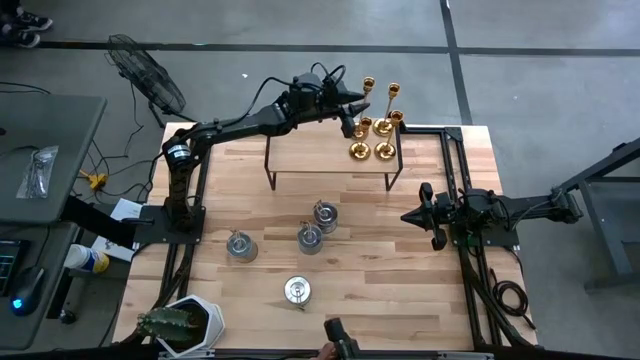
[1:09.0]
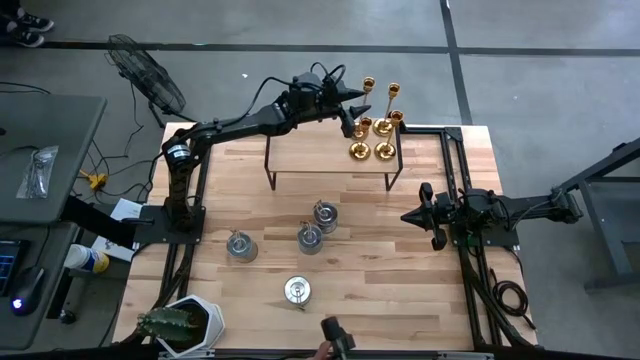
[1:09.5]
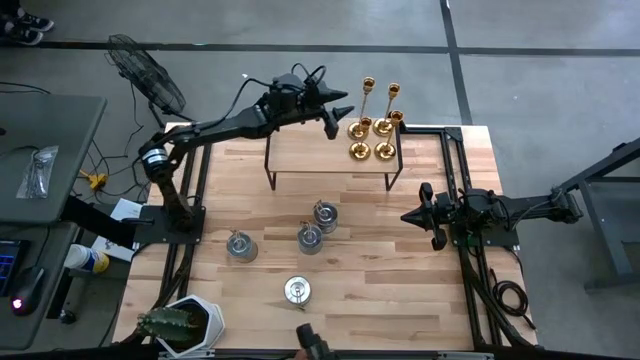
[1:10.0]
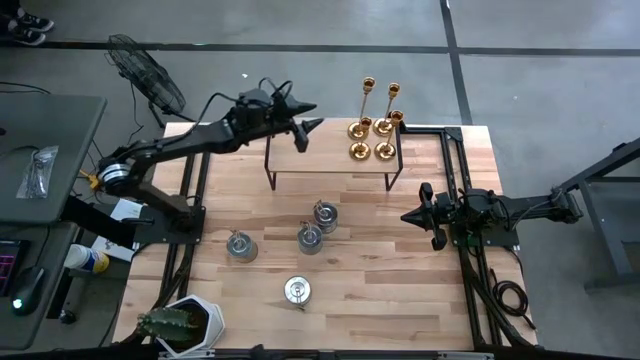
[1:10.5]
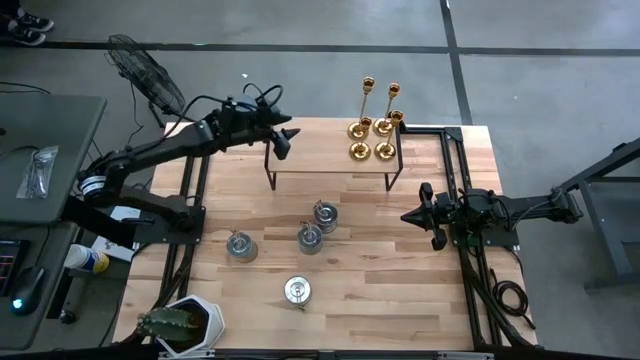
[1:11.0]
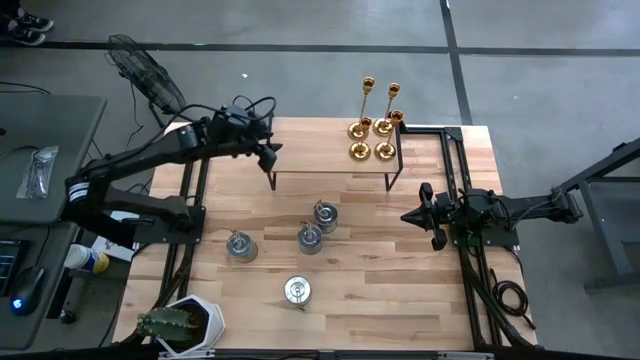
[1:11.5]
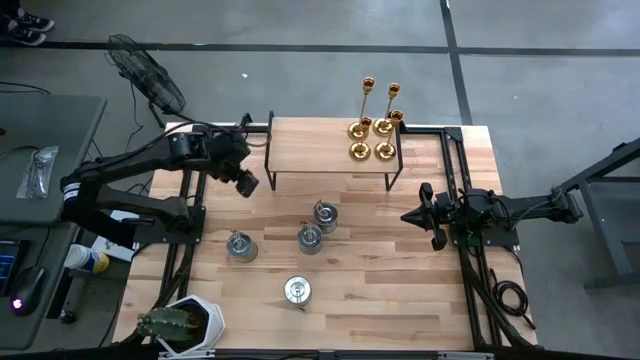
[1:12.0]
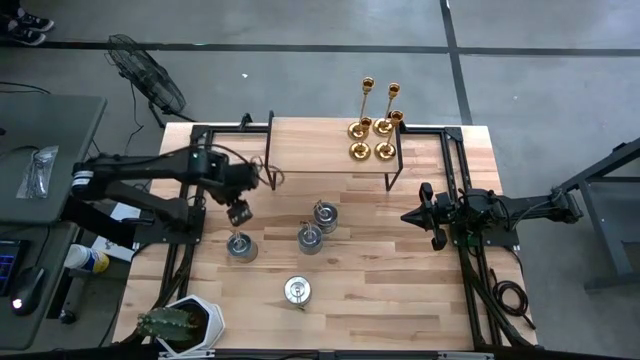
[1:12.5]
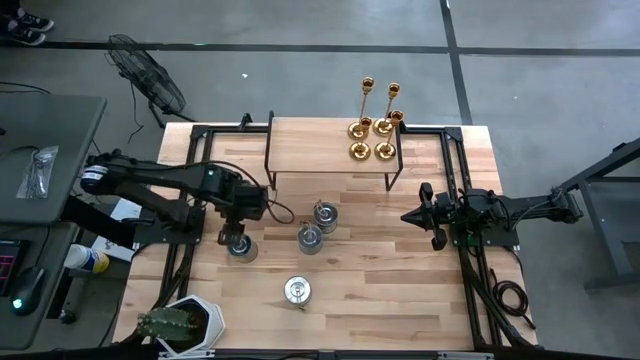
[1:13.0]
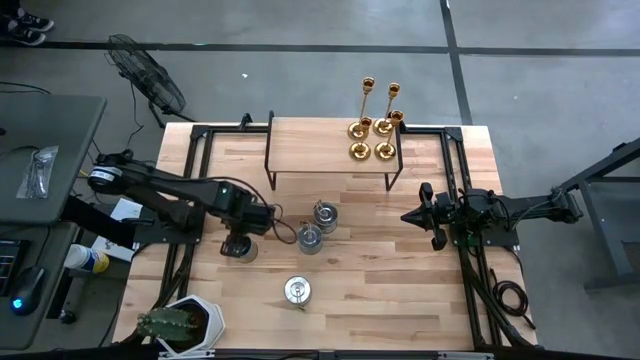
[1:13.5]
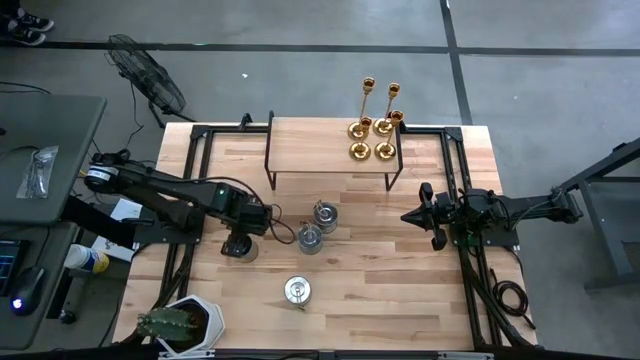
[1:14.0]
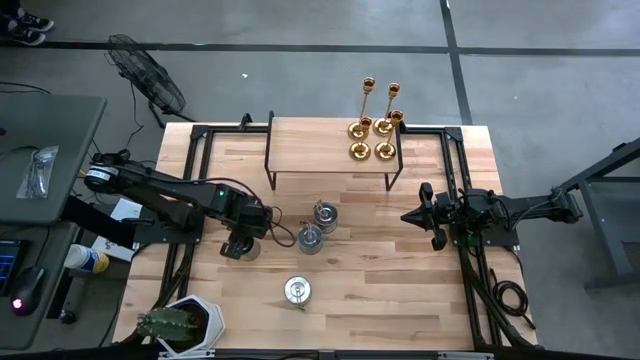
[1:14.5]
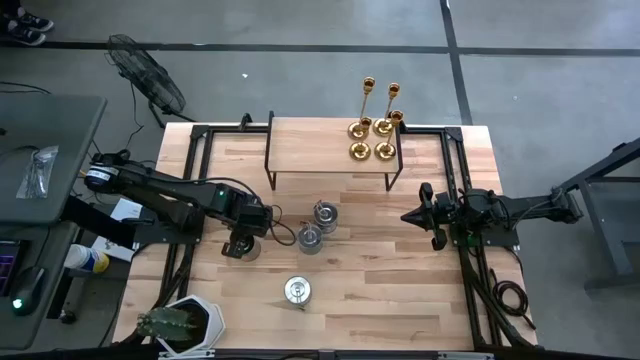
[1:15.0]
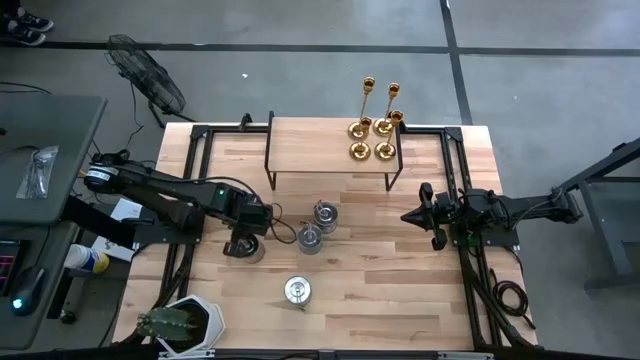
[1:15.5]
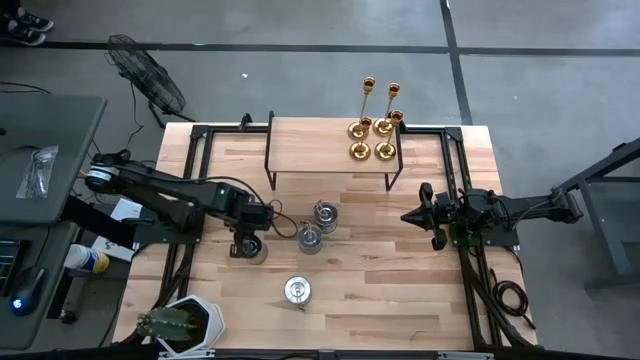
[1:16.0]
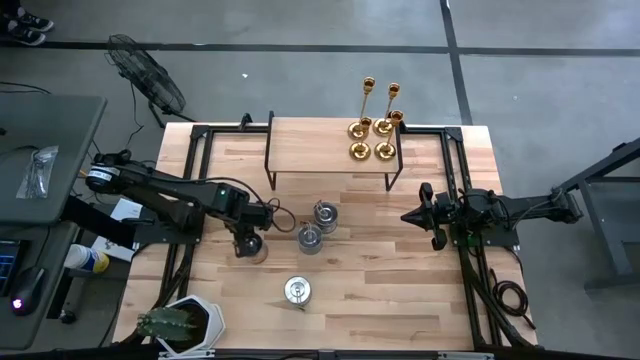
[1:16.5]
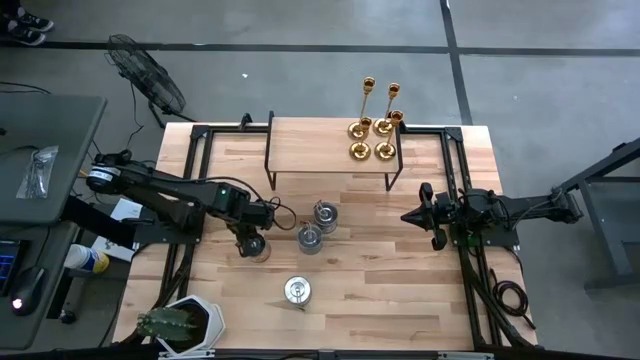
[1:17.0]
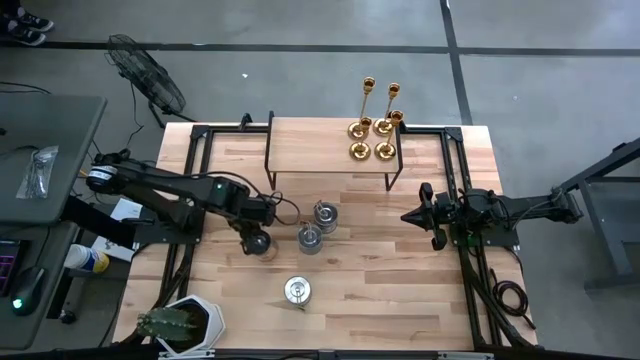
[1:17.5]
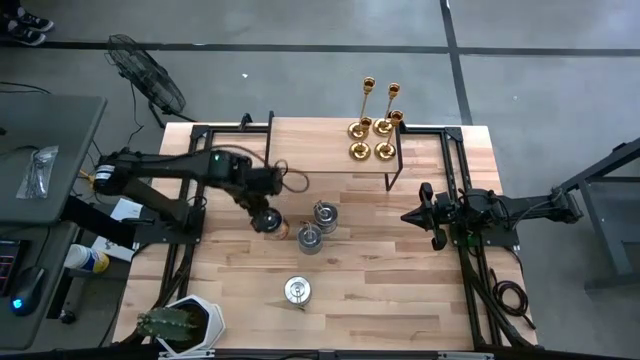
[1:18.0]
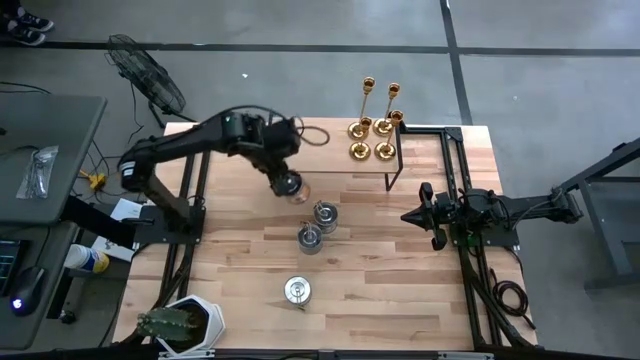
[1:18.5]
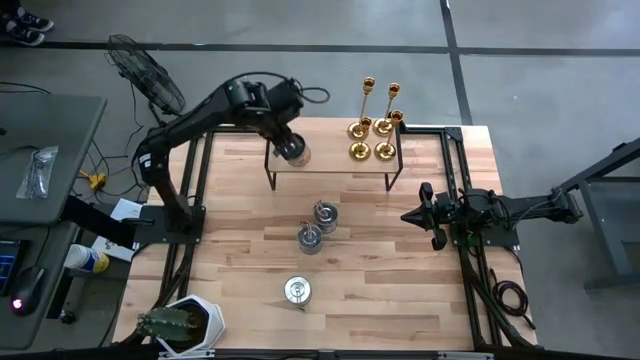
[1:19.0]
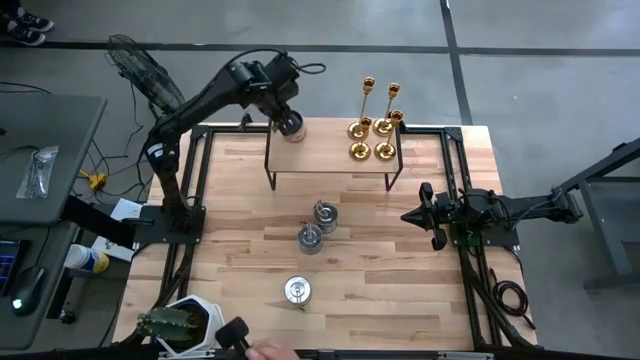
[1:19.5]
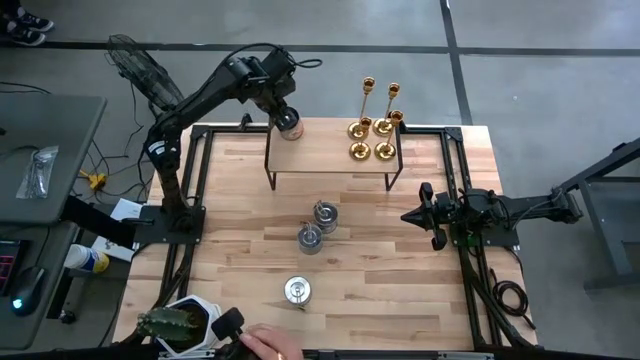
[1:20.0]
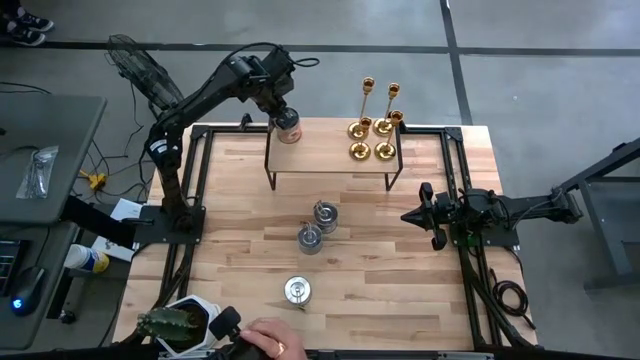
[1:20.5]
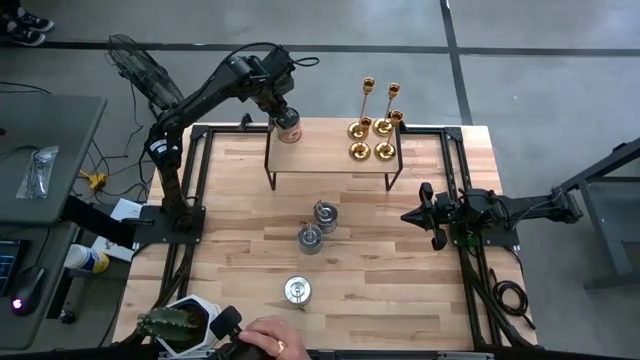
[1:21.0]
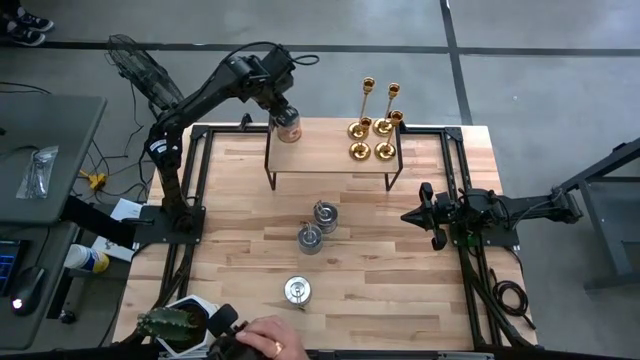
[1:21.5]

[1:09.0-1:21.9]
Task: Pick & Place candle stick holders
Put the orange scented candle on the shelf

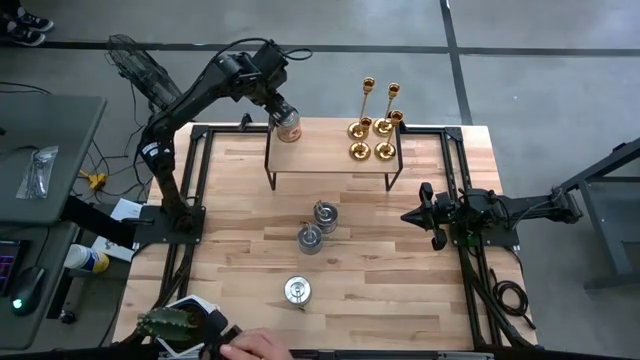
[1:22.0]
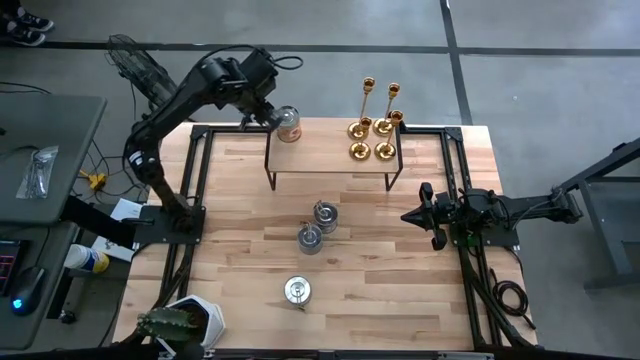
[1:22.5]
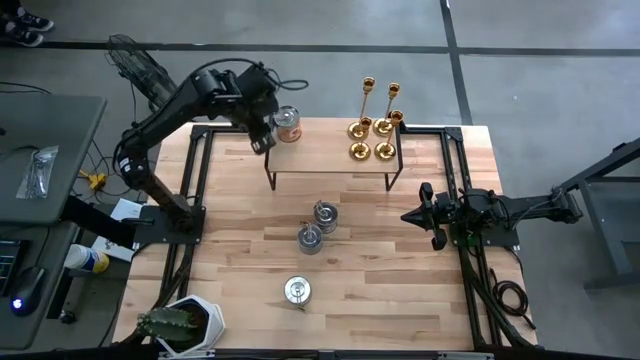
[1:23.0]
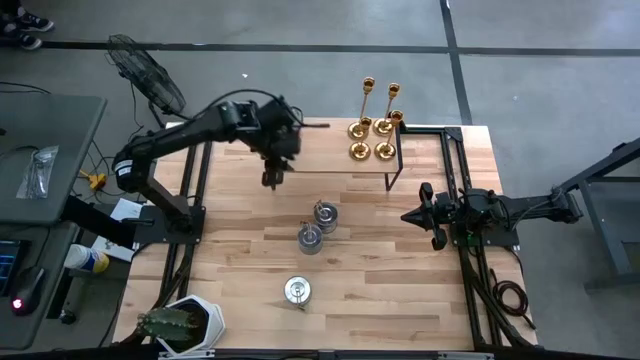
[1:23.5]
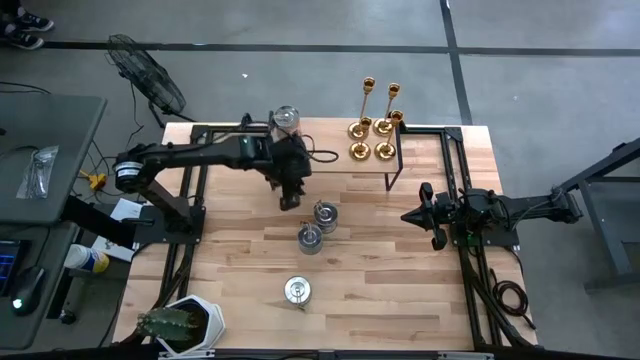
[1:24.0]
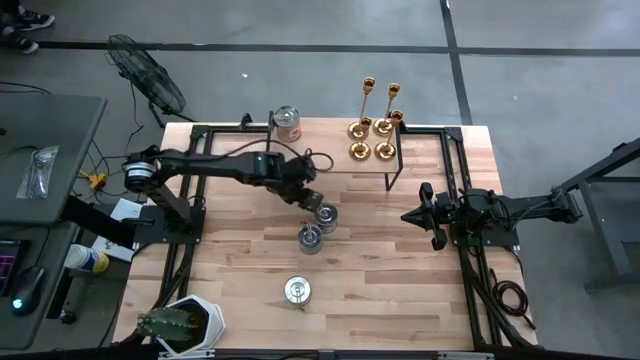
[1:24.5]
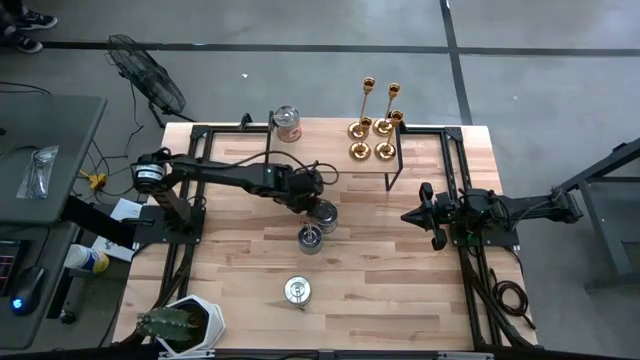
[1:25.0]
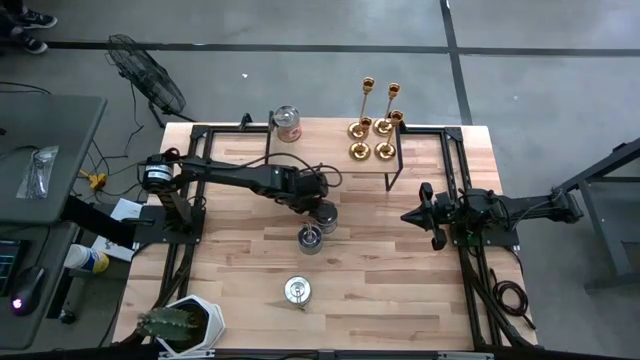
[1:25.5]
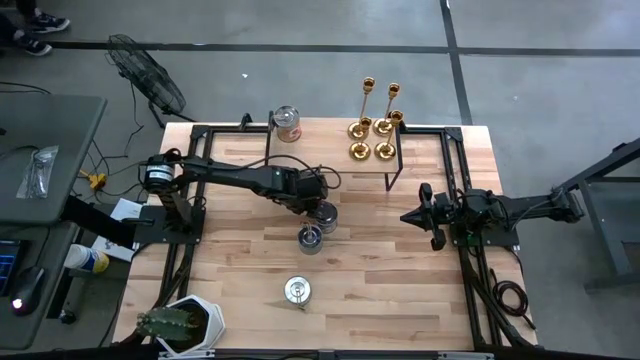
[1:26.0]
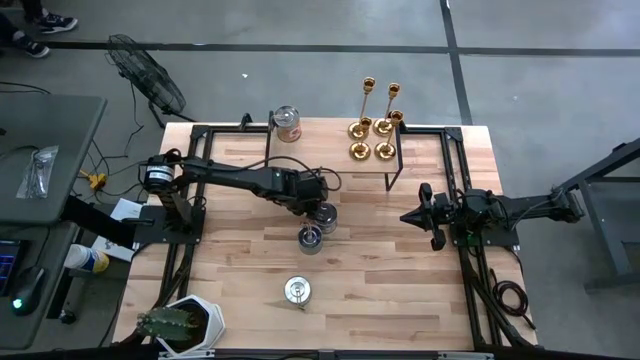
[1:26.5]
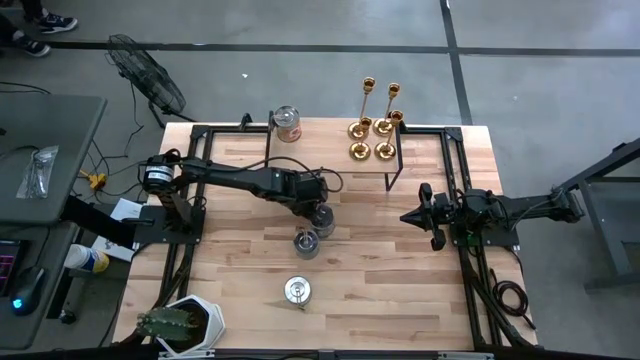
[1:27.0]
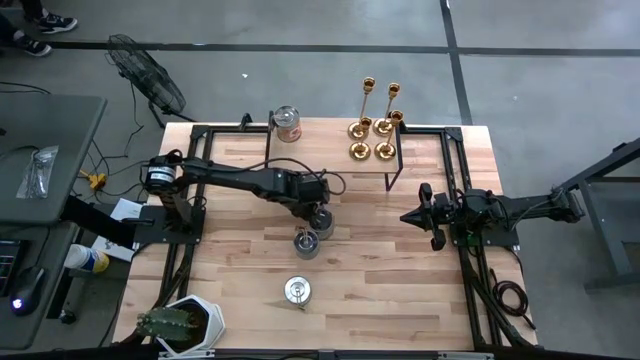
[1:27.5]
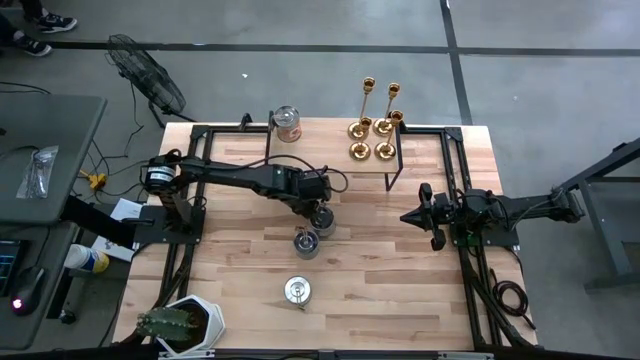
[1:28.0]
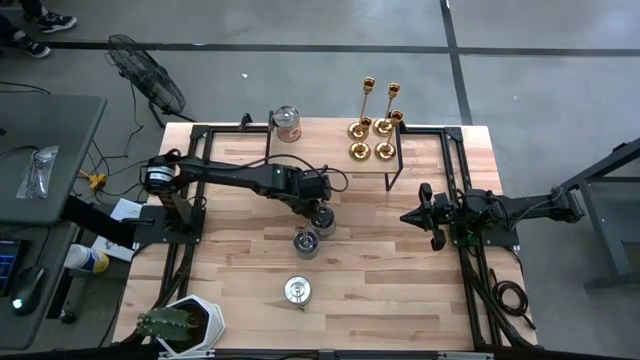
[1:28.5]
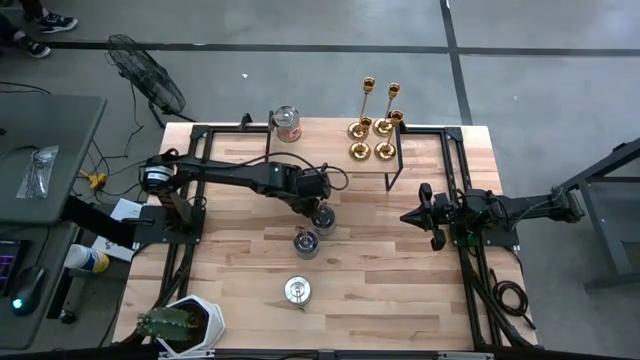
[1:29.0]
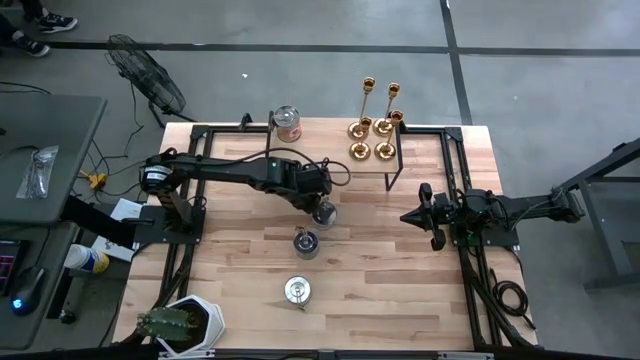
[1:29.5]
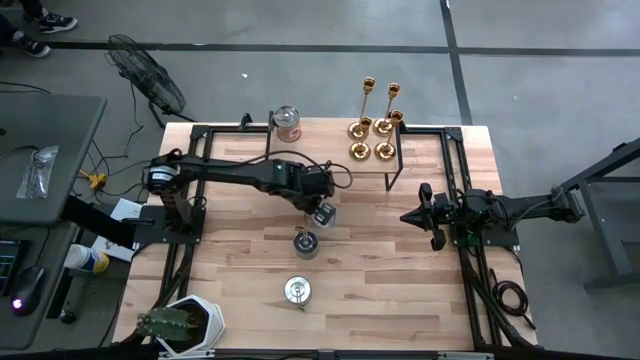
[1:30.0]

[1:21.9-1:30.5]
Put the brown scented candle on the shelf
